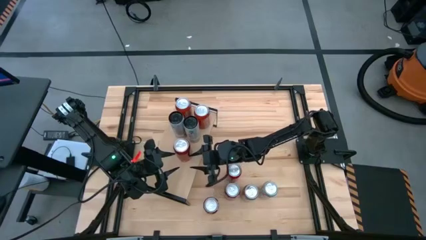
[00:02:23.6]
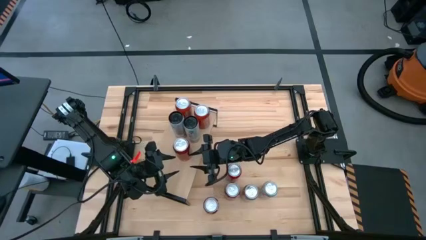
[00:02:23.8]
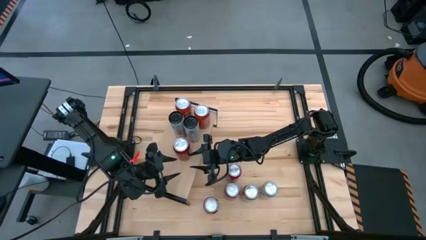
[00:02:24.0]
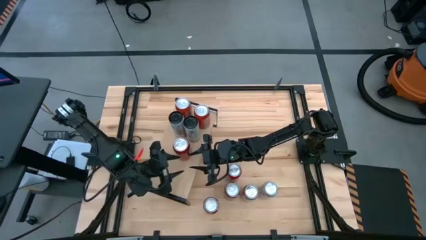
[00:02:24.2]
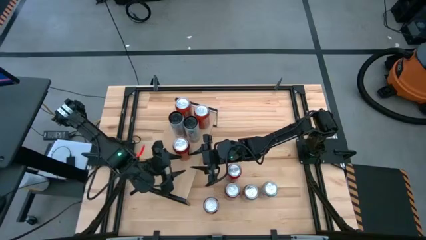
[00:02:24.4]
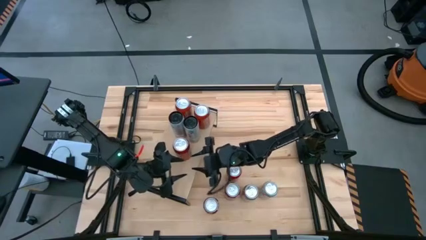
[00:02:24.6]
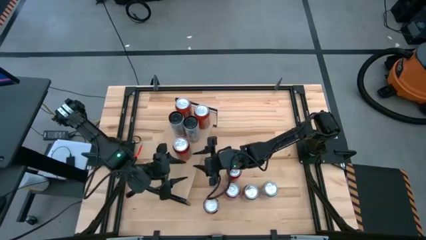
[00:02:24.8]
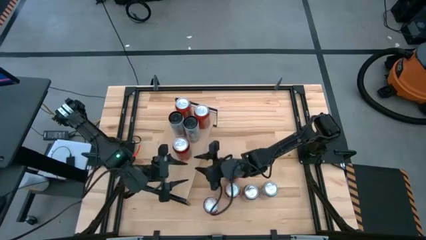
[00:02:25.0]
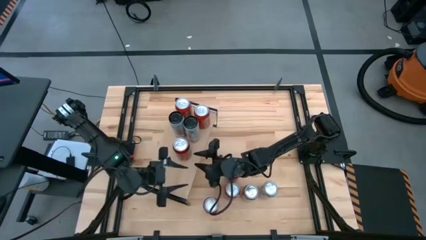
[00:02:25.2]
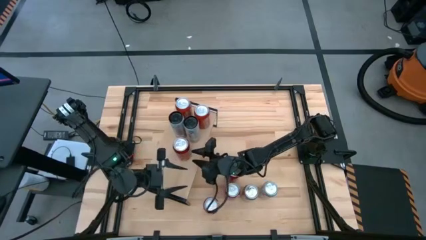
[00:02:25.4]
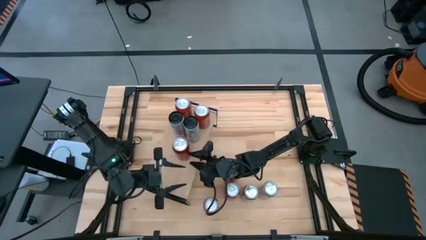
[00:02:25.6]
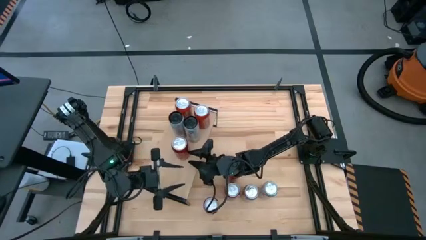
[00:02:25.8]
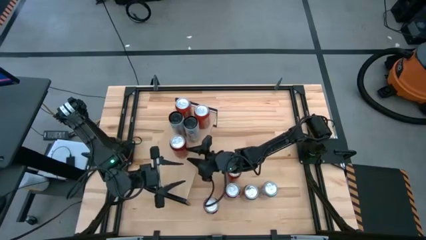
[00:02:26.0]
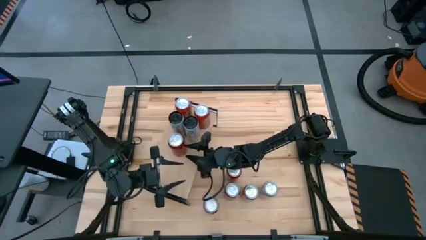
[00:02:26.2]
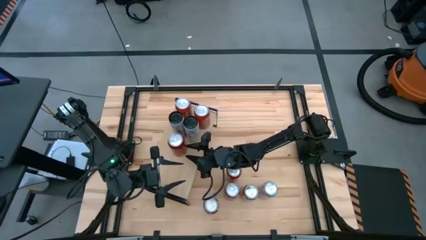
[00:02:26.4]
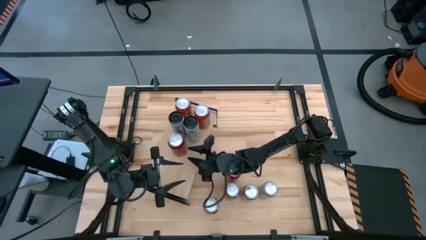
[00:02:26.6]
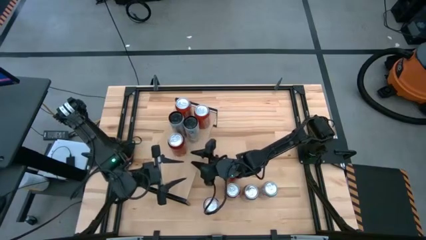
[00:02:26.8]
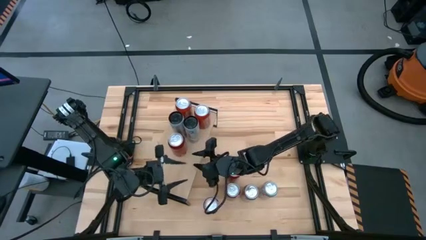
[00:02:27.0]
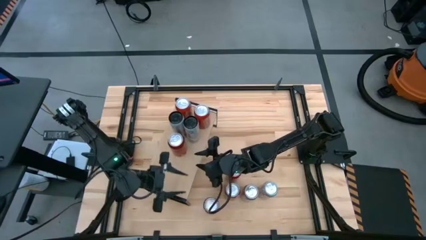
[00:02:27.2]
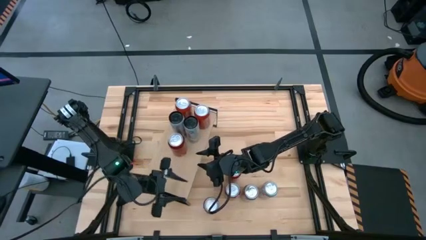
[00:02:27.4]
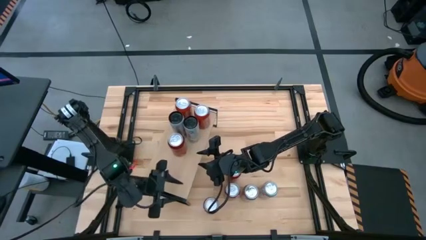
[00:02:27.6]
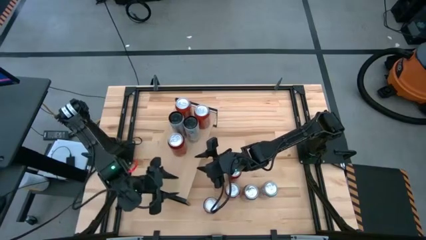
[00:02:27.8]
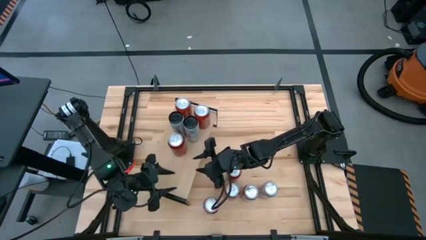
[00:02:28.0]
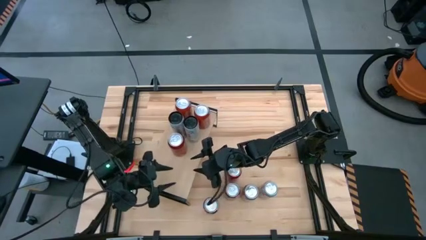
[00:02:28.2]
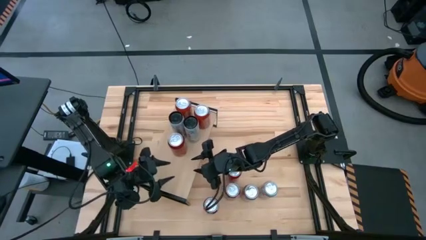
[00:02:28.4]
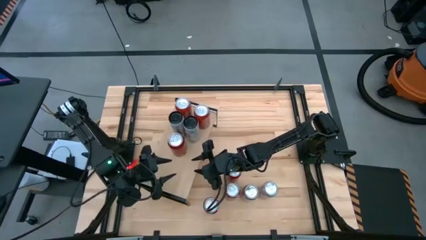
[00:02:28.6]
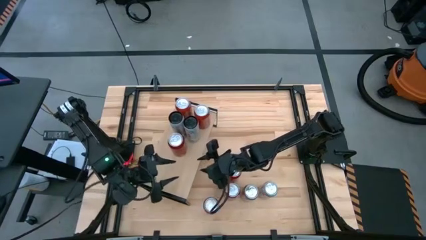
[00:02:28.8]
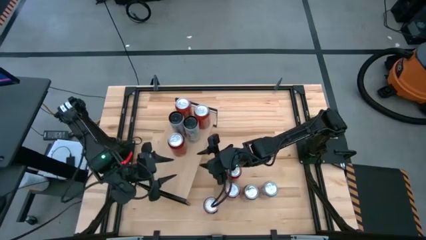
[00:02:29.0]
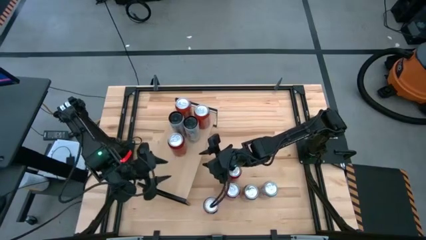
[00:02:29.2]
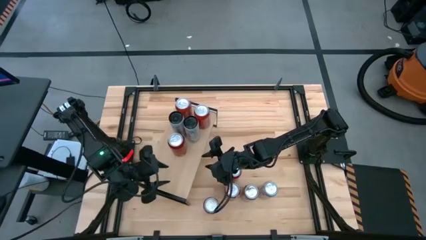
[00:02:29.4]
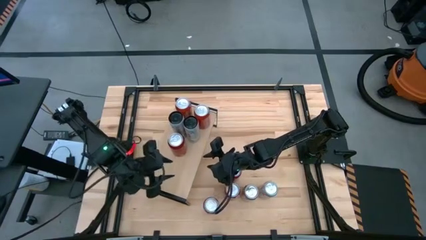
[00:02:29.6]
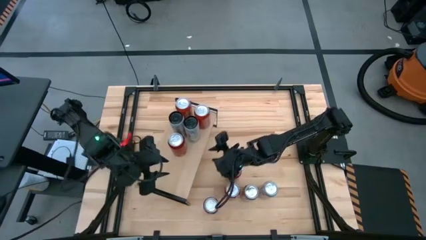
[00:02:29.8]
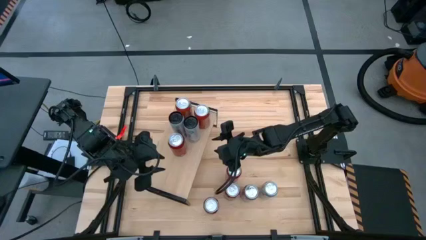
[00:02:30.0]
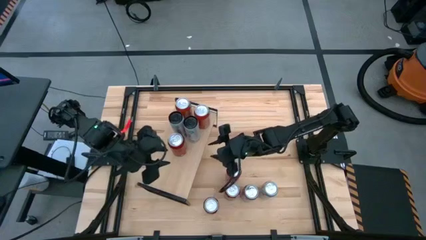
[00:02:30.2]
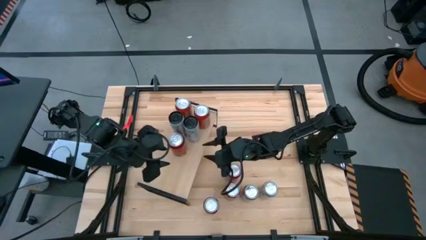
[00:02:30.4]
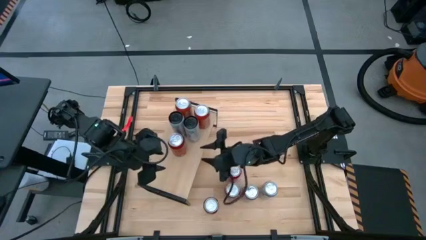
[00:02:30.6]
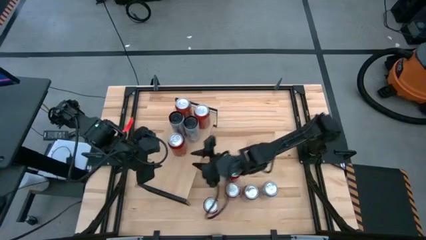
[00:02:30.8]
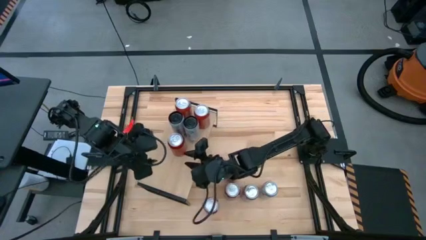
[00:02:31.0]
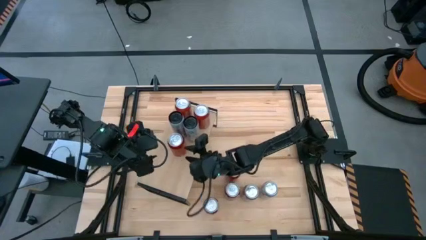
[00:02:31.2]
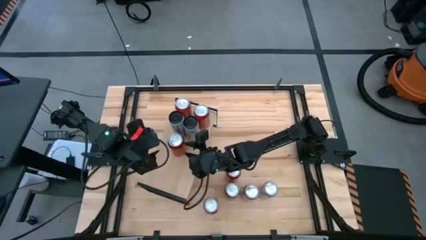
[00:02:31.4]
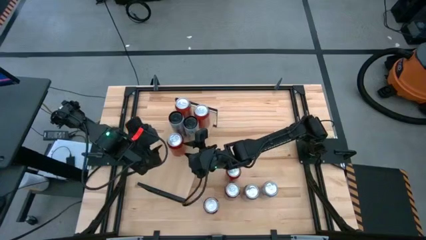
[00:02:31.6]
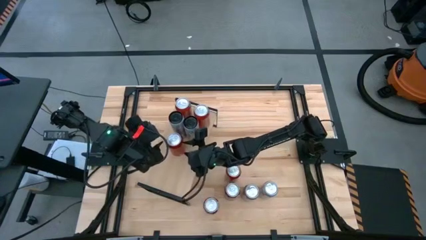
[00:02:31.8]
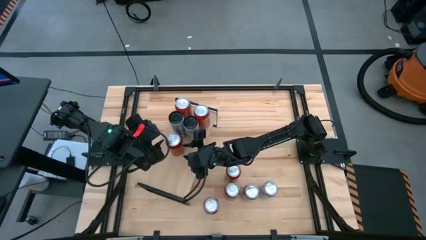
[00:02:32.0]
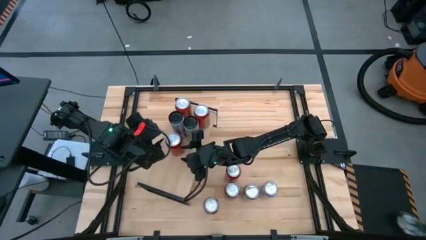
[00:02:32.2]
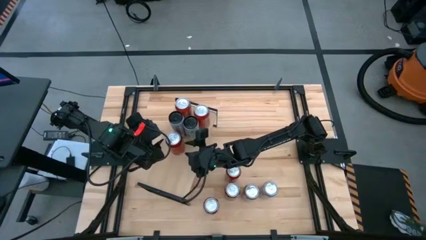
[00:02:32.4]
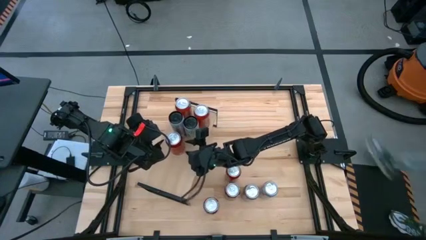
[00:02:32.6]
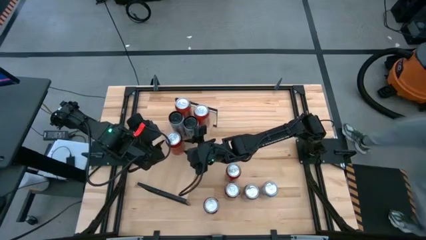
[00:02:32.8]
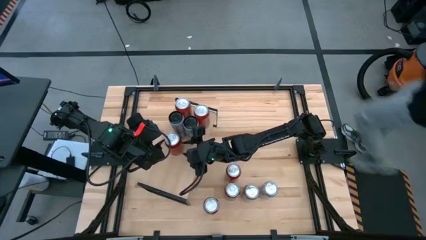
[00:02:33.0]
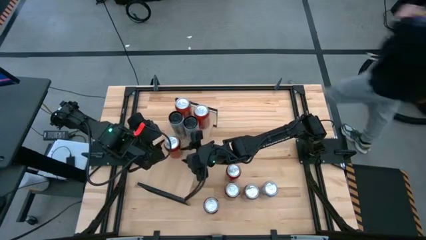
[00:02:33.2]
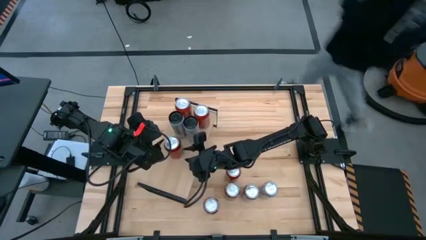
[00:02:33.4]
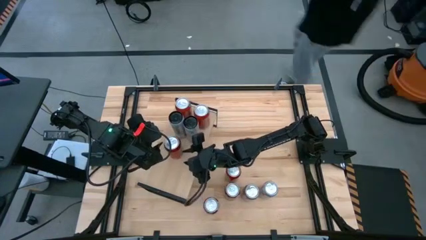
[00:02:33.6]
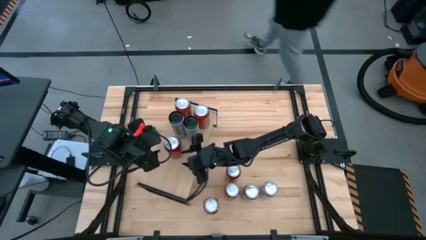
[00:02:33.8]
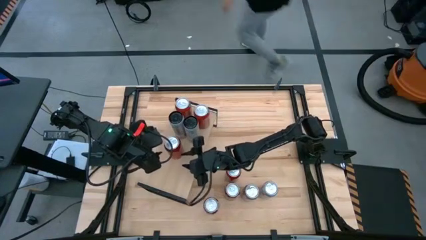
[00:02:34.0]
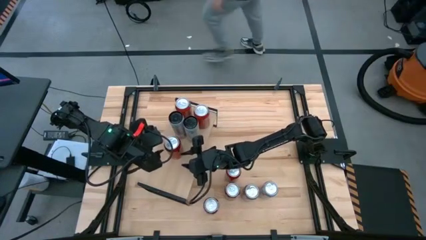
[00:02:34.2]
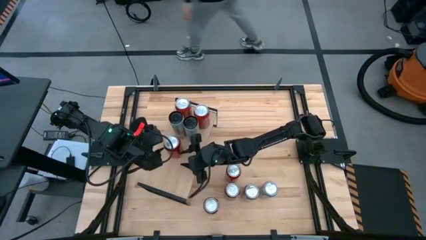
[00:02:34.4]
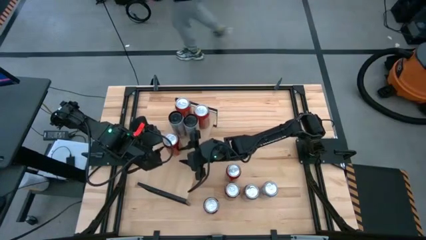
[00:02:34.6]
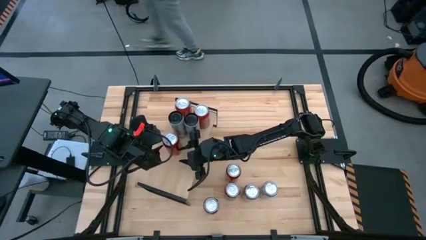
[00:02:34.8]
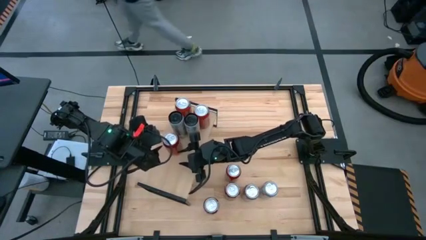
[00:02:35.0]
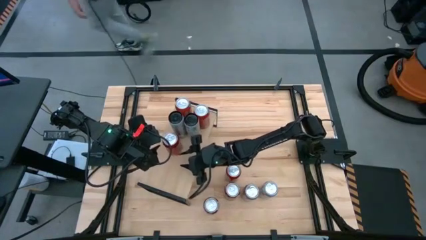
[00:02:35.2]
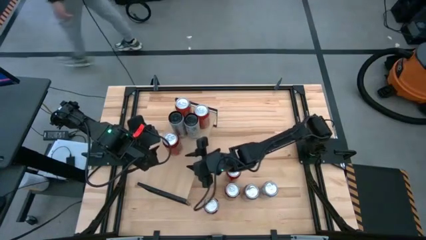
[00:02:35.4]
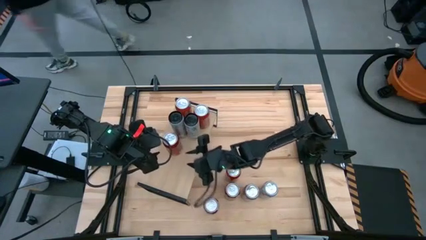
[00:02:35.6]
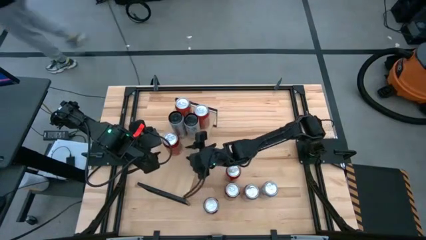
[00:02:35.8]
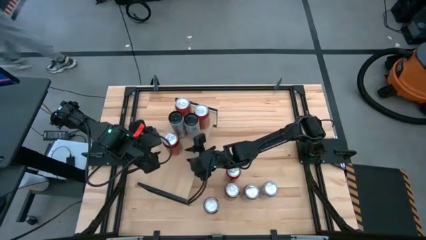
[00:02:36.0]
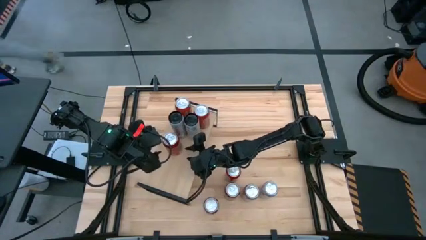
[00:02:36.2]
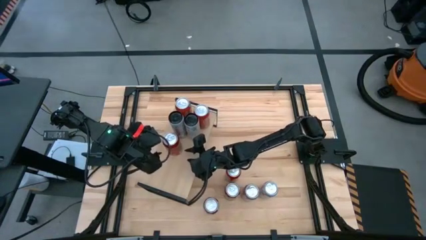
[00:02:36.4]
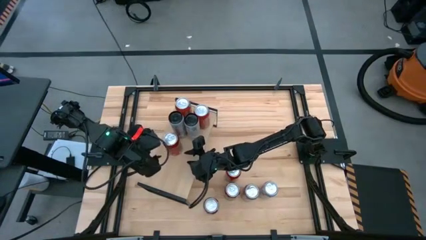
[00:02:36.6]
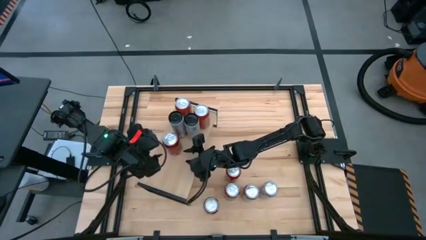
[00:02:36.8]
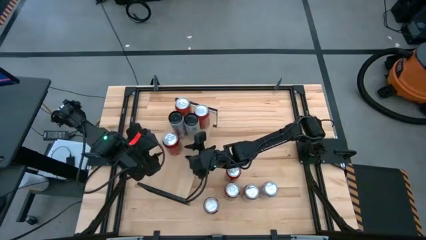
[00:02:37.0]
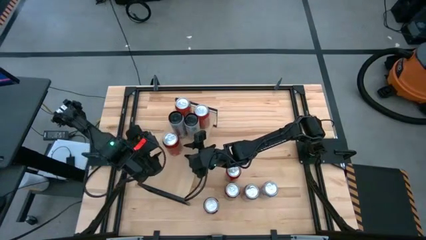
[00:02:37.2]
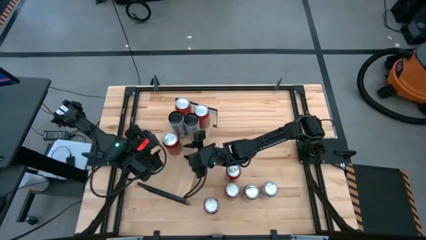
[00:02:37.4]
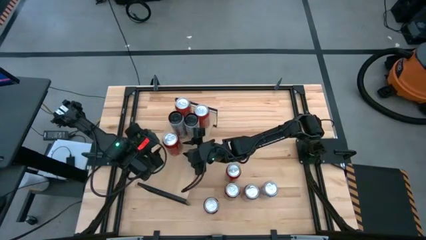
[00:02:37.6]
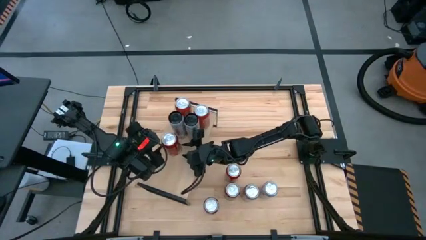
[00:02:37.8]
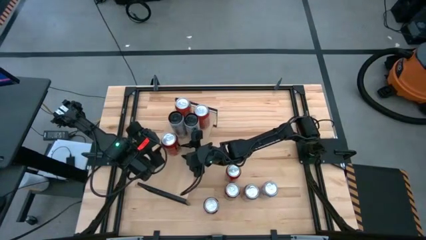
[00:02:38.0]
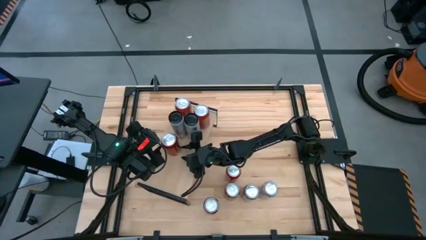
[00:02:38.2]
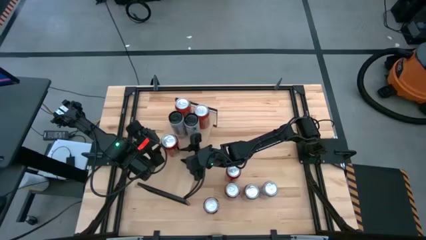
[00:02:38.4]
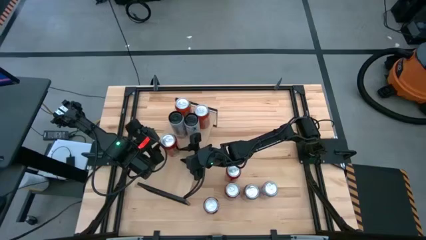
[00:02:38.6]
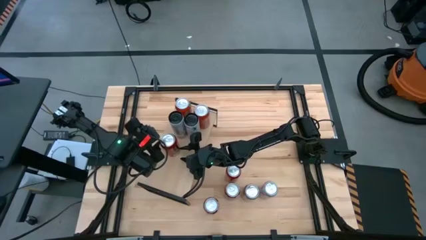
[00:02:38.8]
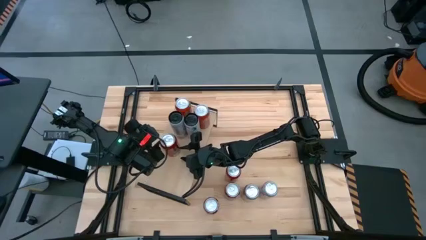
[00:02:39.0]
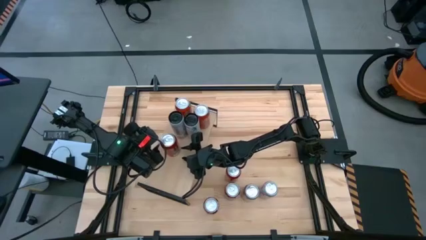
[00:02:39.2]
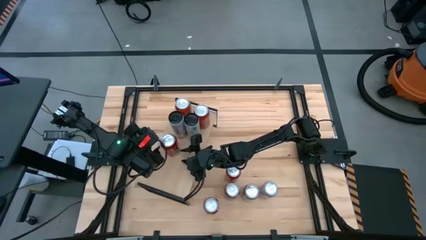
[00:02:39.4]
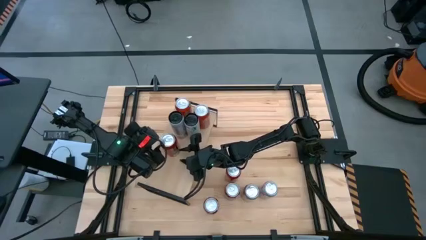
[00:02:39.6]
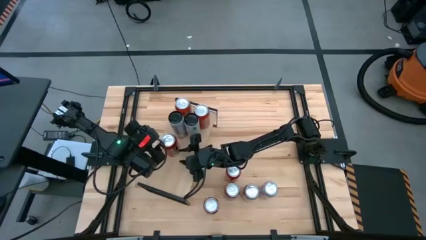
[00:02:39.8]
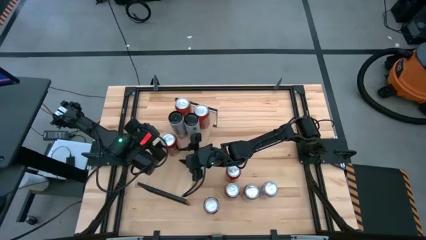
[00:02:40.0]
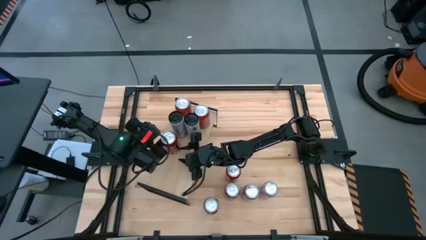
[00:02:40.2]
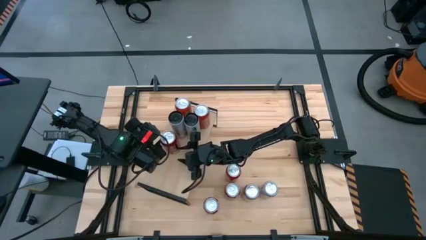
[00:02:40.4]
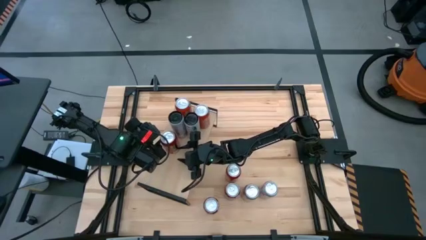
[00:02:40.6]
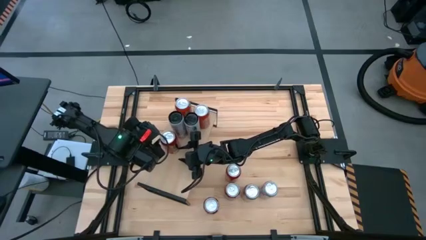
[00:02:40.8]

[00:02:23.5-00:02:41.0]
Task: Place canned beverage on shelf
Put the top red soda can on the shelf
